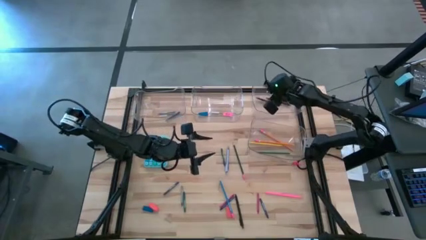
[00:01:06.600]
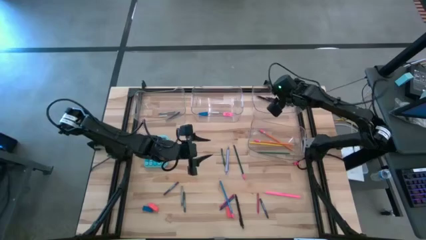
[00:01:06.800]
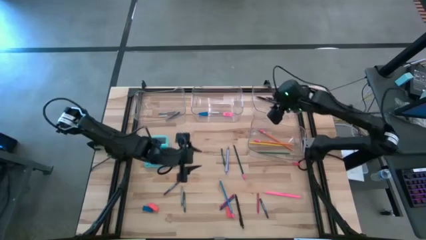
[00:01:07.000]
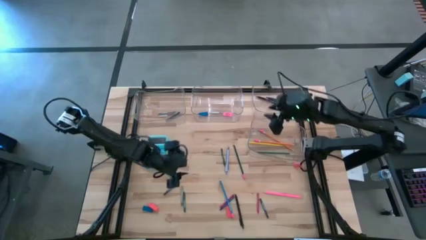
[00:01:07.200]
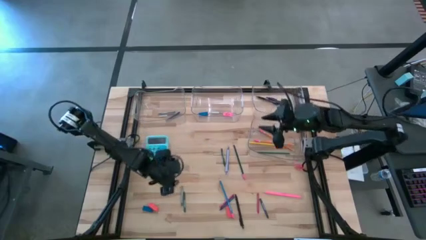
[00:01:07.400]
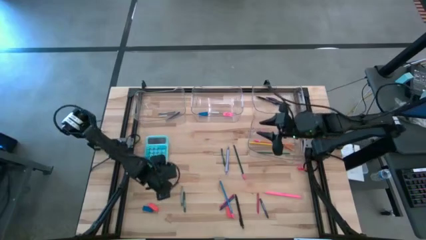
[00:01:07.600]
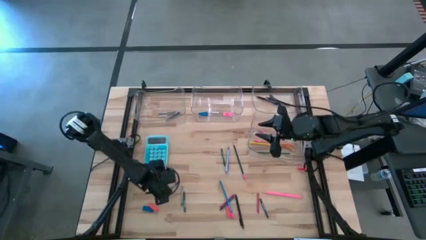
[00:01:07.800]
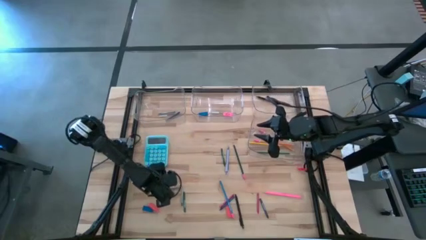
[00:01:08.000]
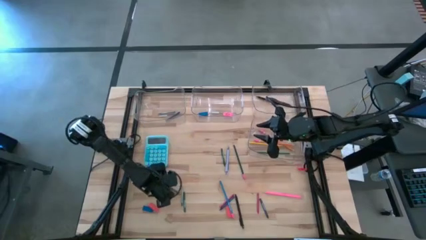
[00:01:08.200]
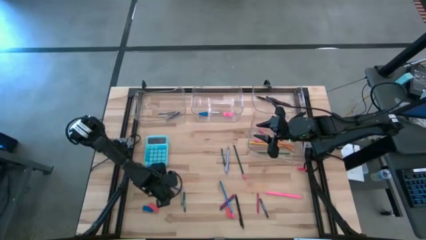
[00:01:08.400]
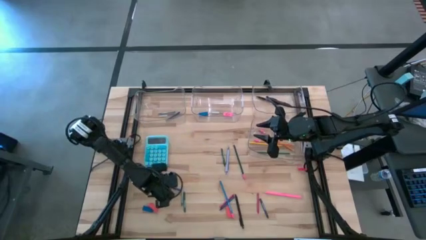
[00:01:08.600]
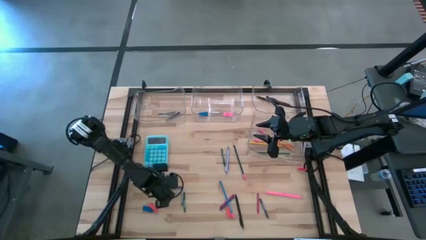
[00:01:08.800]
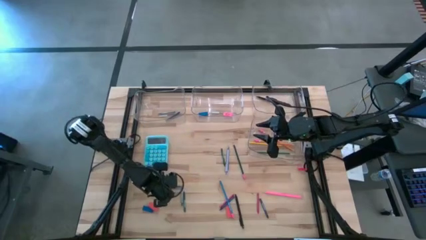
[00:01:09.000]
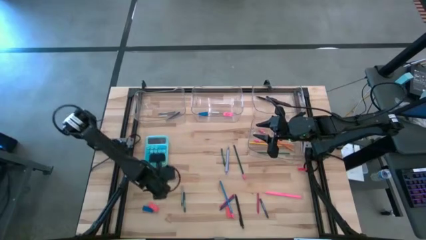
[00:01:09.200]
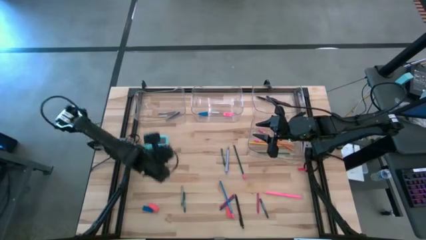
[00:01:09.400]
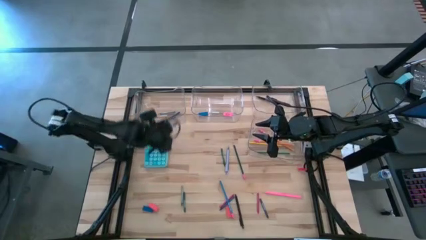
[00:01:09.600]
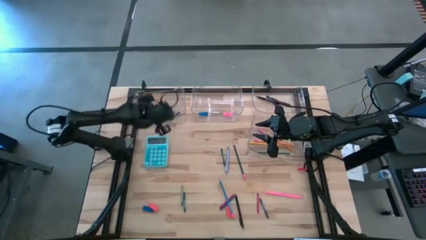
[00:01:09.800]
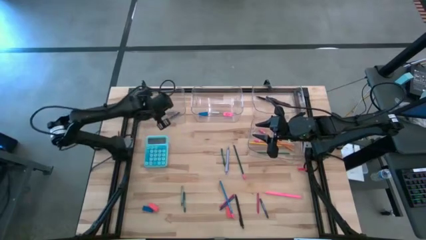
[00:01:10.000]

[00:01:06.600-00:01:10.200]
Task: Sort crayons/erasers/pens/pencils in bins
Put the blue crayon into the top left transparent bin

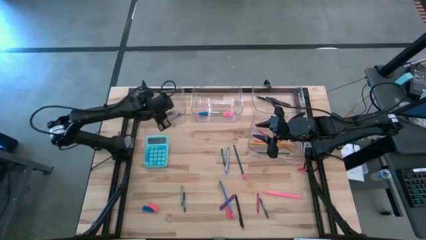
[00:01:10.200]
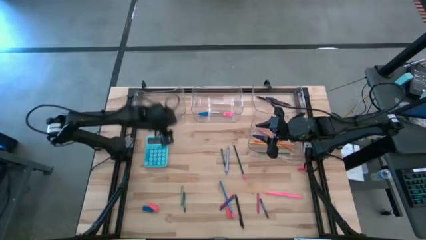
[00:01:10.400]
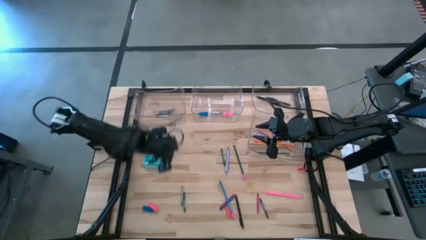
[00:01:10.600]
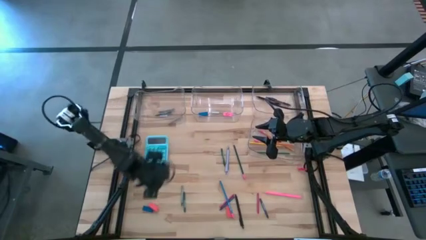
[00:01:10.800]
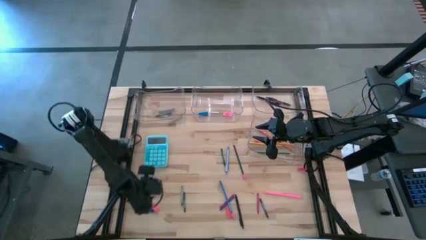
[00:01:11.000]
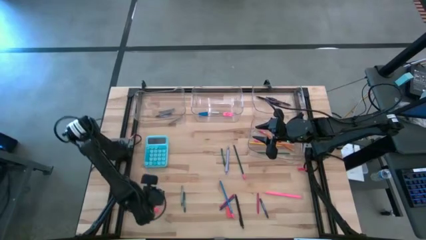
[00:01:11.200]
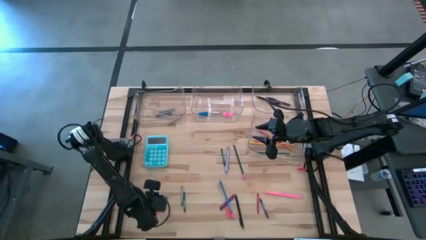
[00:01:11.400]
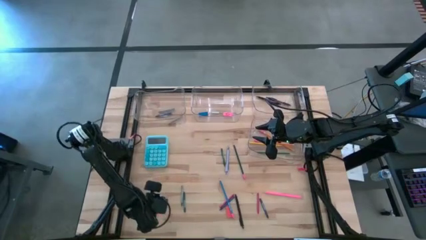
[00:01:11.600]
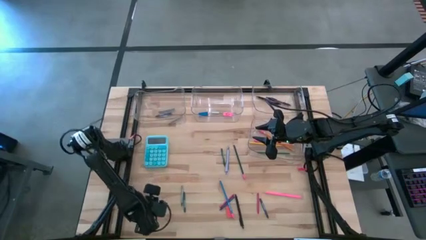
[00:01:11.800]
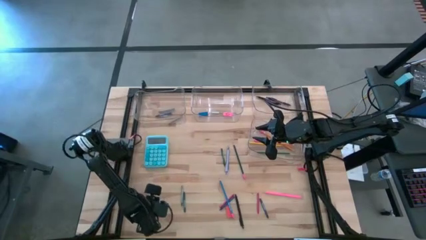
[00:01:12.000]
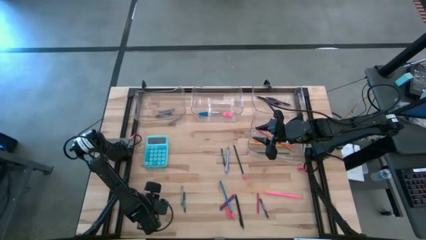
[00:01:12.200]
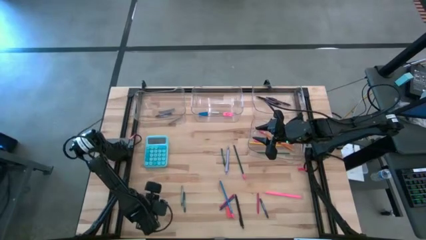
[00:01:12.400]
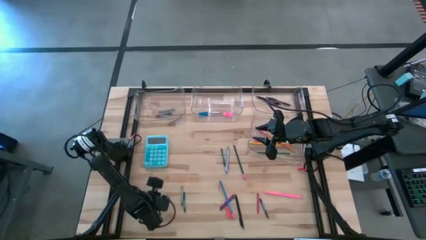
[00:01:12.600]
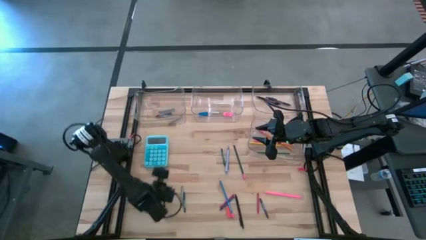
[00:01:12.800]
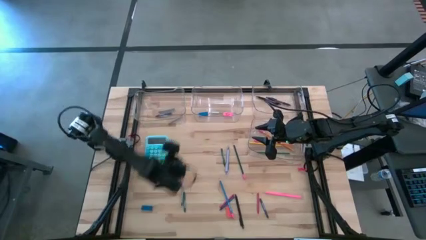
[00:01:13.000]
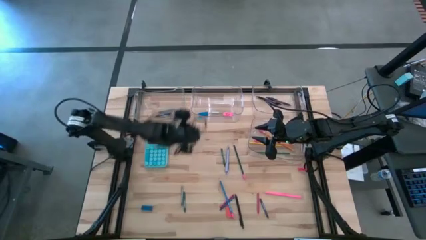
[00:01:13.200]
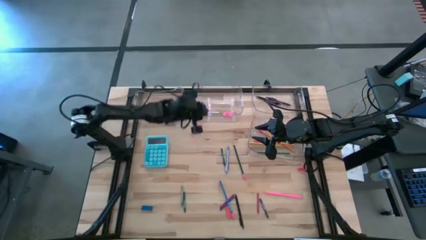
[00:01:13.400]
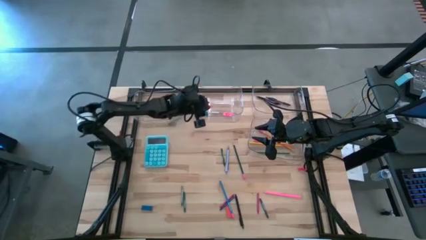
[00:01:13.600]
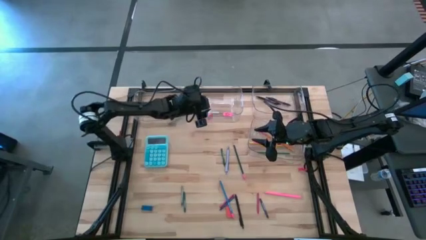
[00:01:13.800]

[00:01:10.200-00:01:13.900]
Put the orange eraser into the top center transparent bin

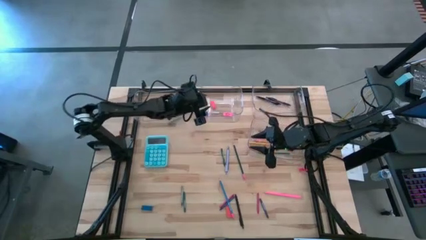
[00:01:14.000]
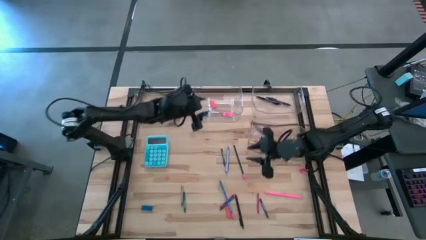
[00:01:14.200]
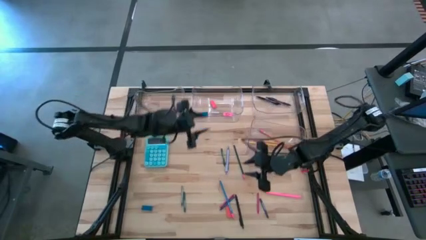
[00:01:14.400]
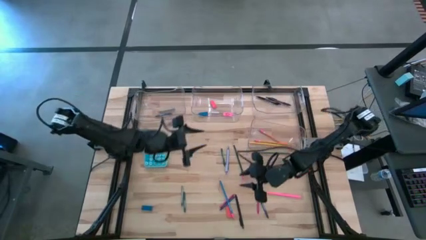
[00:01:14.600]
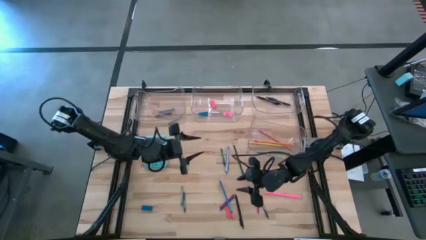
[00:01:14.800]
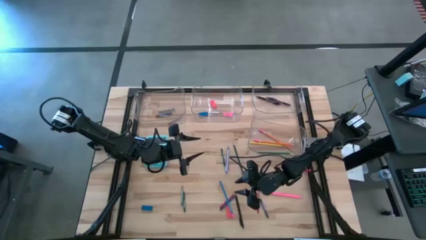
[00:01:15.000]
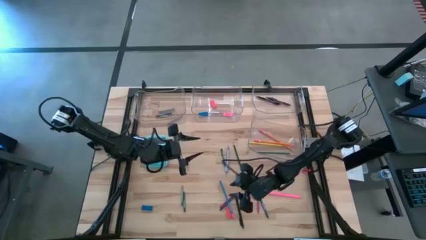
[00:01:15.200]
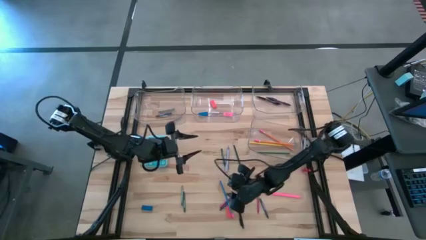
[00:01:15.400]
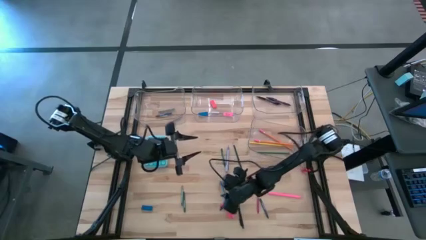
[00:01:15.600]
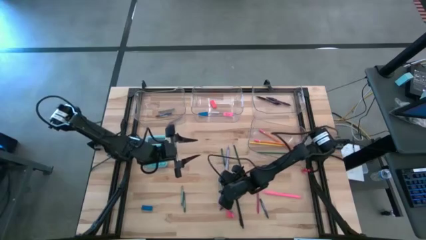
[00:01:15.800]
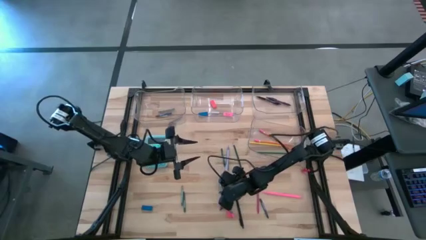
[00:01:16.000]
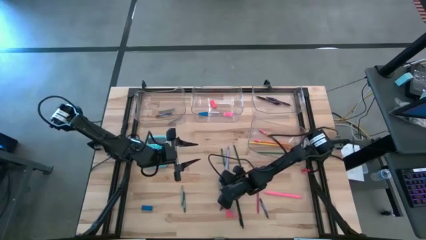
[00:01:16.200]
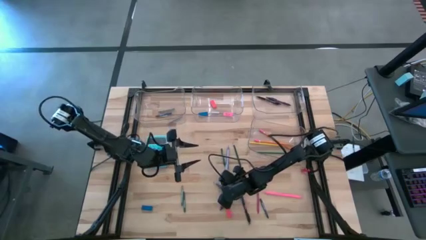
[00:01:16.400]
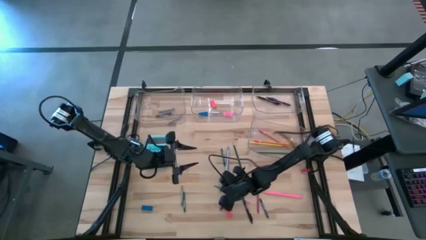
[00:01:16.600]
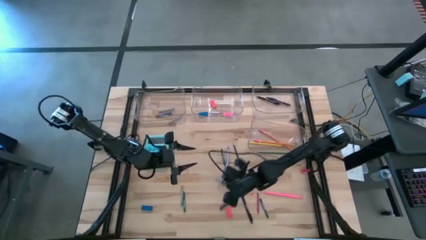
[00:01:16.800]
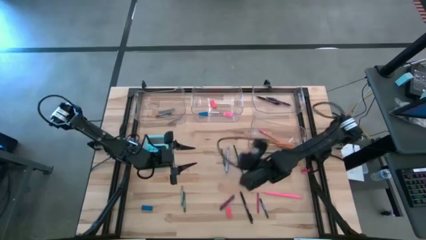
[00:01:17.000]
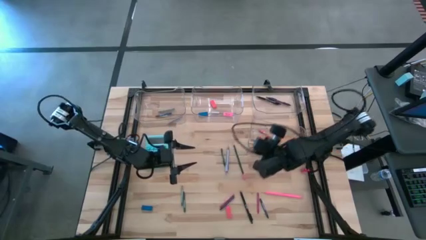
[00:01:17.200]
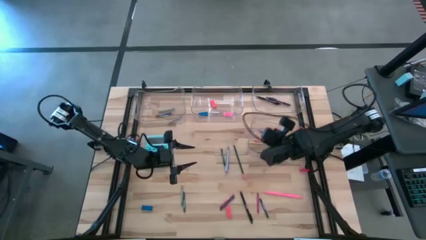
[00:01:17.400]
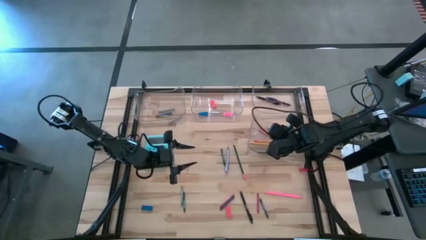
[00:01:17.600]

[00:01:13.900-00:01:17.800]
Put the blue colored pencil into the bottom transparent bin

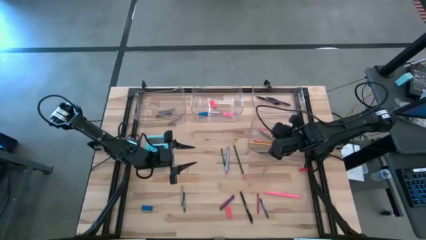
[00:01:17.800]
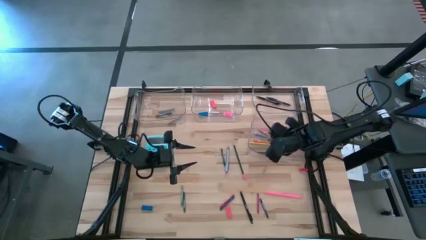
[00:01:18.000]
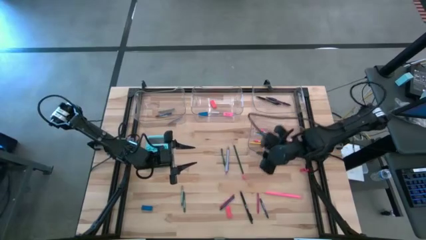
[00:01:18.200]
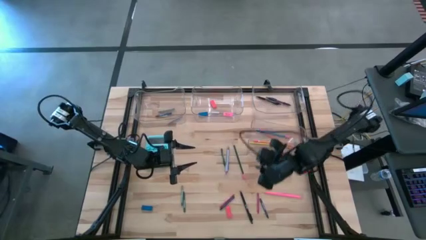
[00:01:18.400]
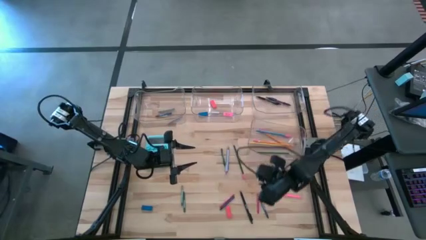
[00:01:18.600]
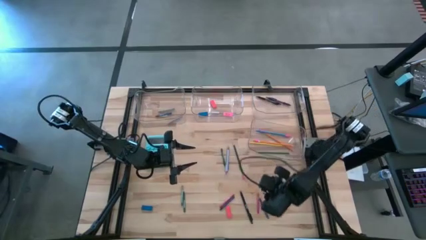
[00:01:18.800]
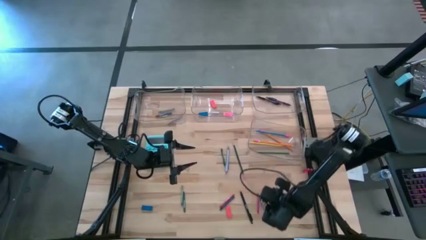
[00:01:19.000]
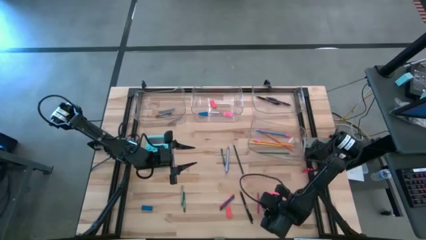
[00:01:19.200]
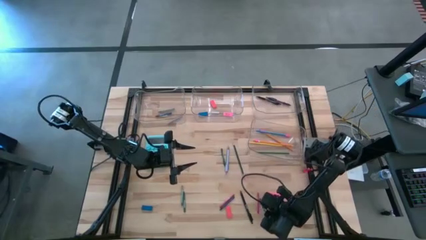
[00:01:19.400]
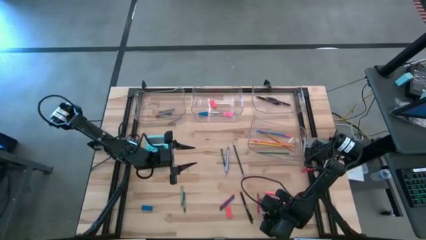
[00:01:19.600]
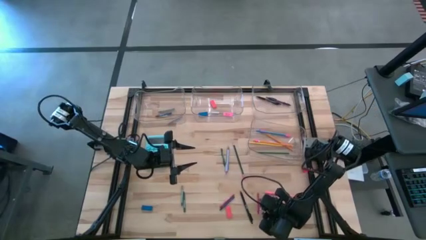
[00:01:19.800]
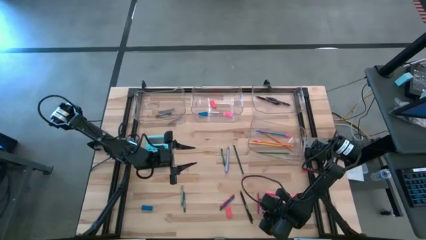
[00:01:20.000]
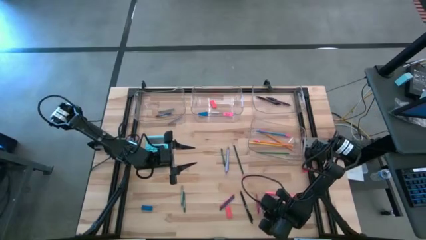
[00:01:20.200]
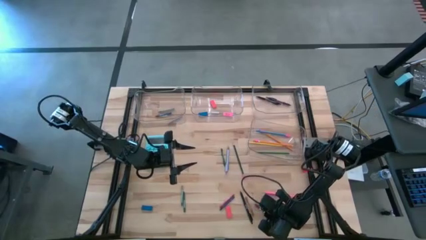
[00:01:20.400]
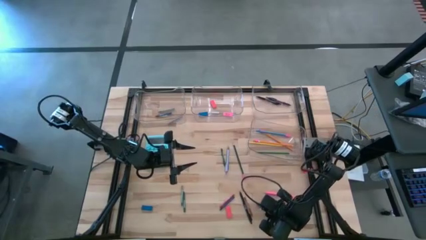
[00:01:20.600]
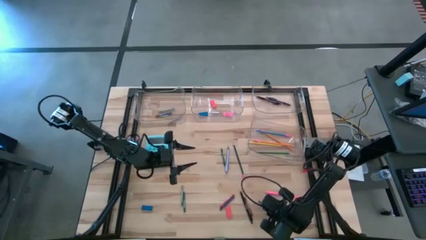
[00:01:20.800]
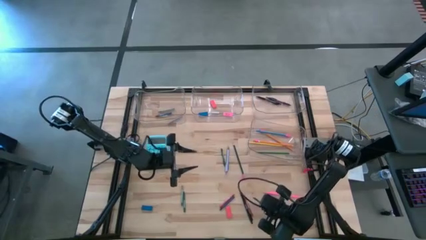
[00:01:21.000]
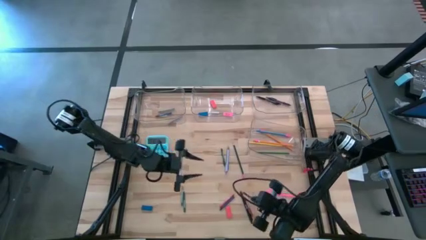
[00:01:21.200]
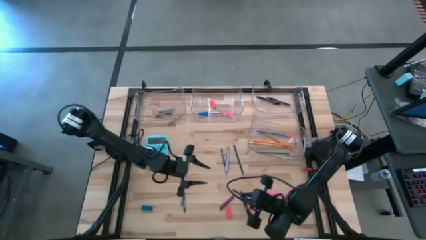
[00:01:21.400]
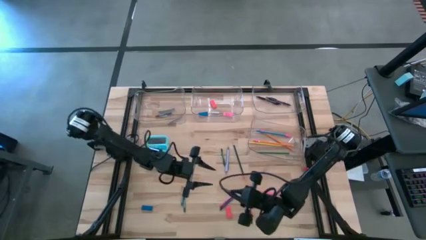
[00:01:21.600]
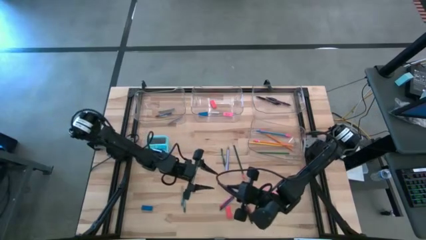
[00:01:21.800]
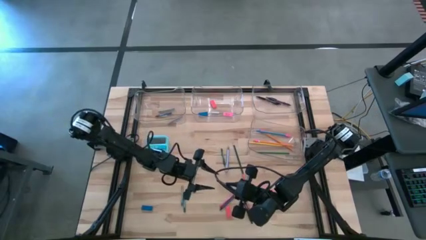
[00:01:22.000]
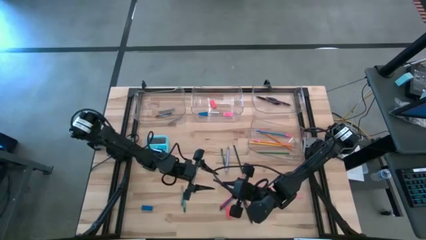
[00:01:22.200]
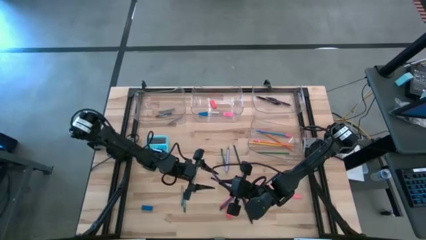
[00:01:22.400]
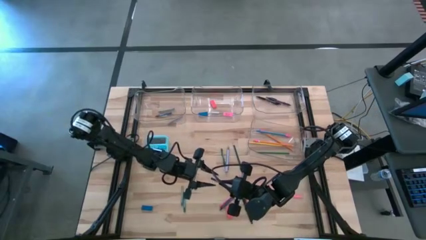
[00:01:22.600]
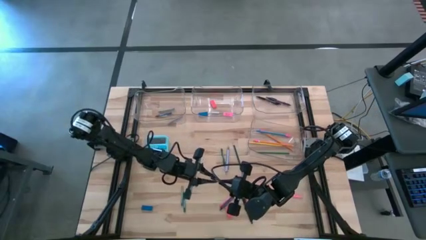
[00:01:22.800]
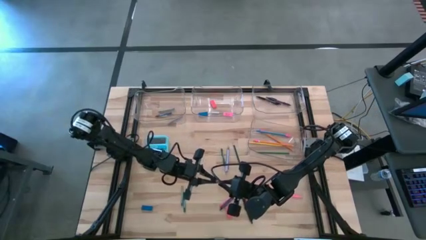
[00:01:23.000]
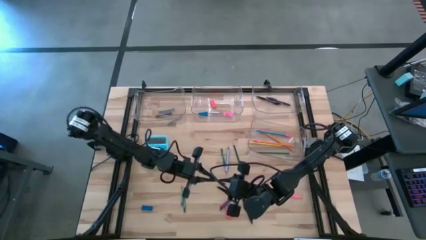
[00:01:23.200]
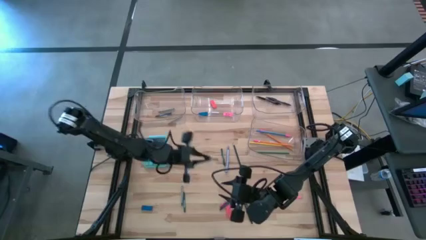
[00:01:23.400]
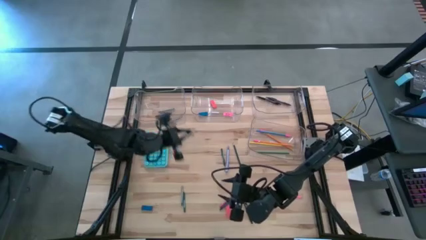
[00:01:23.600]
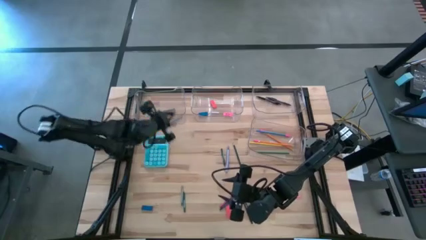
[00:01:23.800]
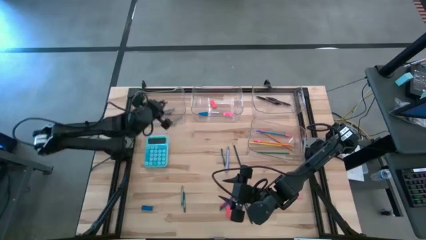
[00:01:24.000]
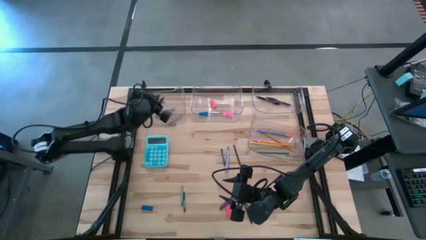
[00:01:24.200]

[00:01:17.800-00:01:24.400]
Put the blue crayon into the top left transparent bin
